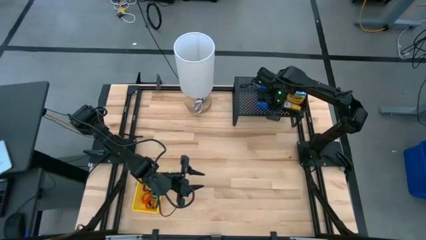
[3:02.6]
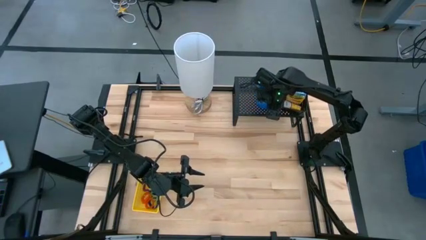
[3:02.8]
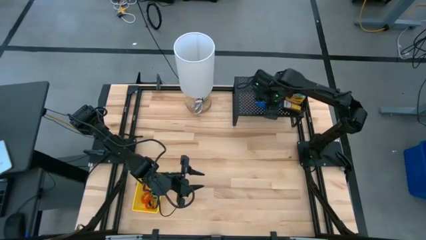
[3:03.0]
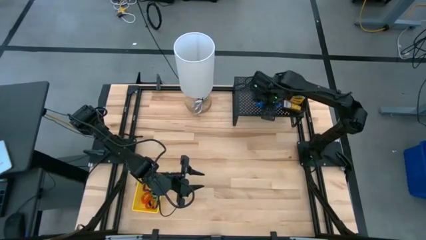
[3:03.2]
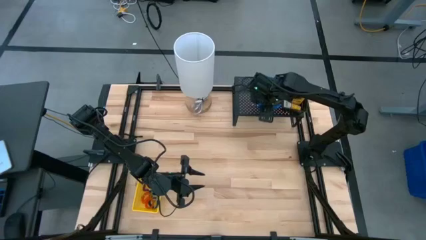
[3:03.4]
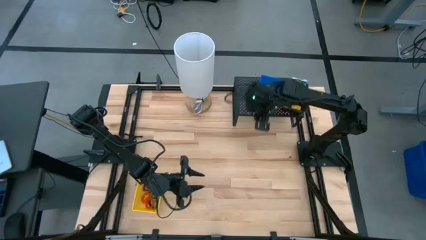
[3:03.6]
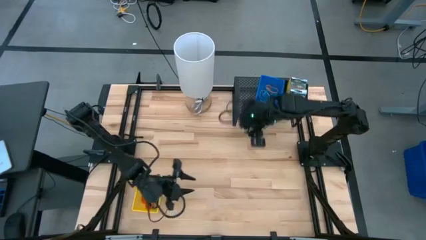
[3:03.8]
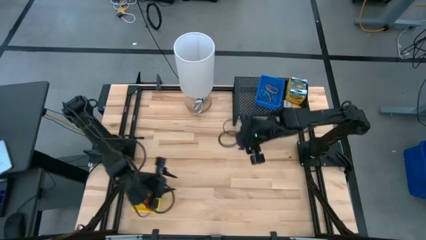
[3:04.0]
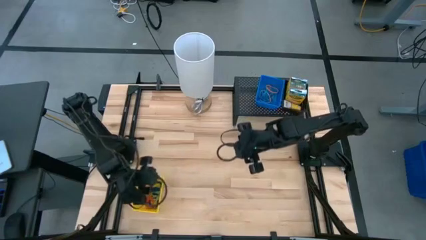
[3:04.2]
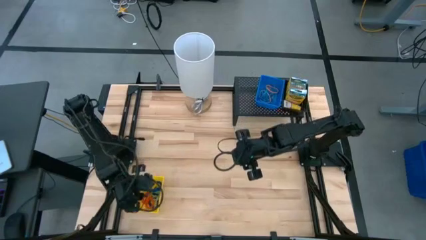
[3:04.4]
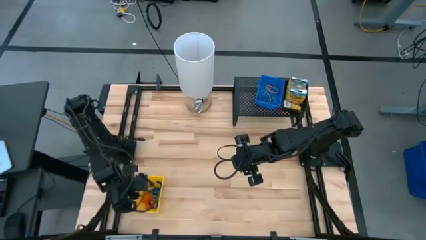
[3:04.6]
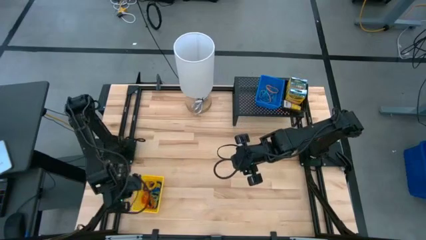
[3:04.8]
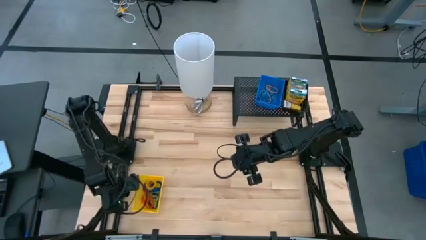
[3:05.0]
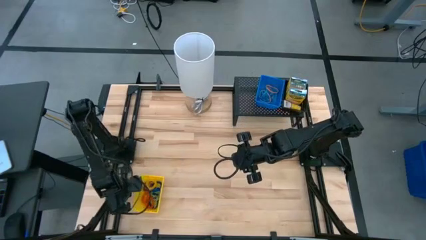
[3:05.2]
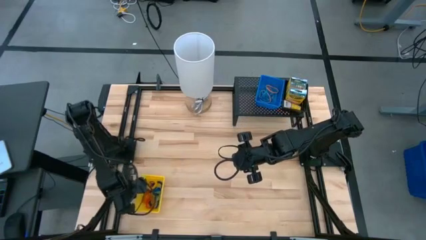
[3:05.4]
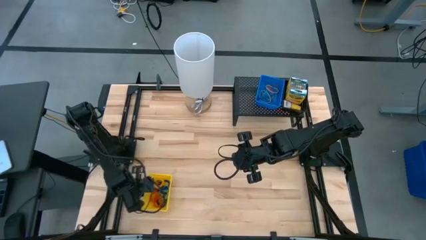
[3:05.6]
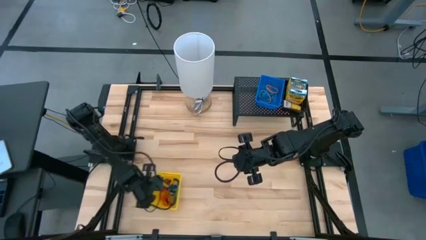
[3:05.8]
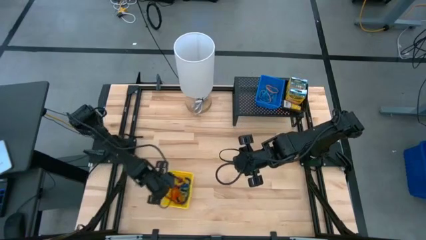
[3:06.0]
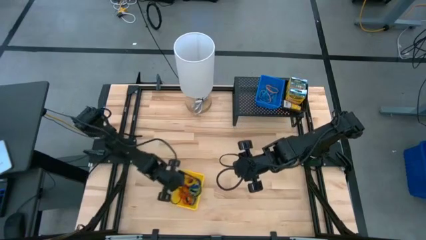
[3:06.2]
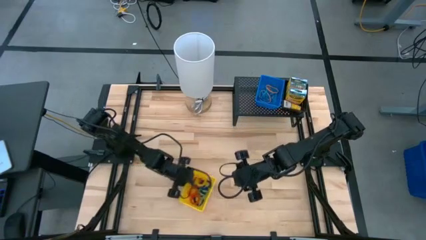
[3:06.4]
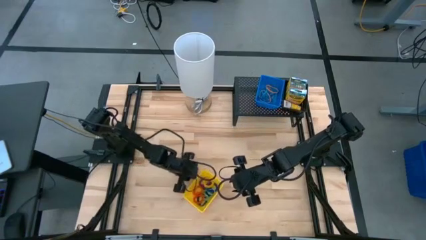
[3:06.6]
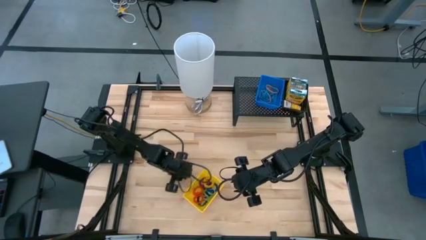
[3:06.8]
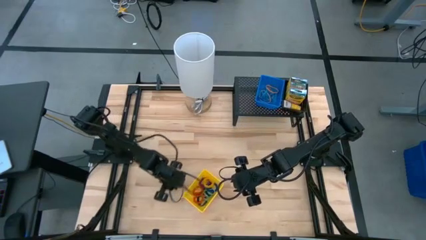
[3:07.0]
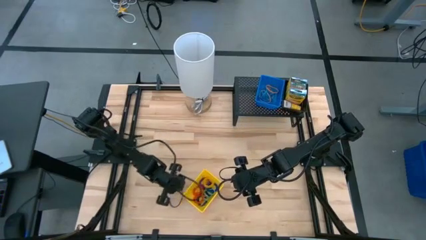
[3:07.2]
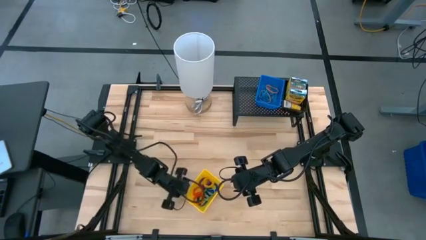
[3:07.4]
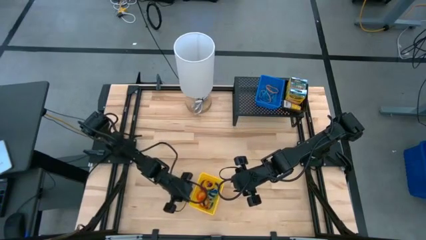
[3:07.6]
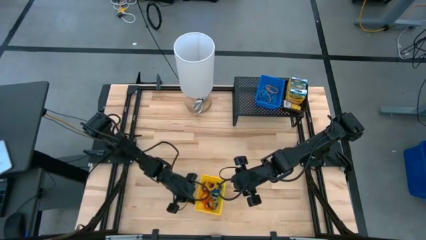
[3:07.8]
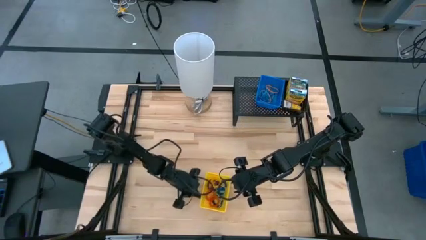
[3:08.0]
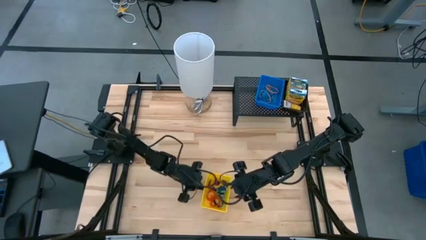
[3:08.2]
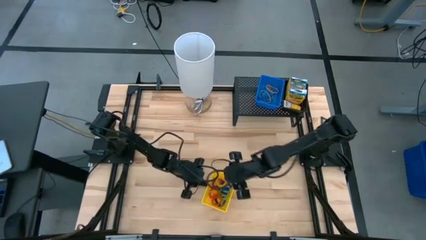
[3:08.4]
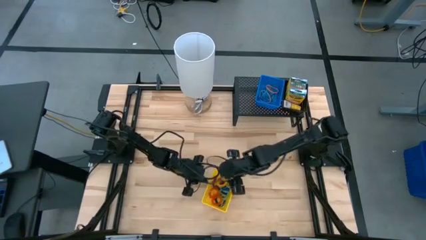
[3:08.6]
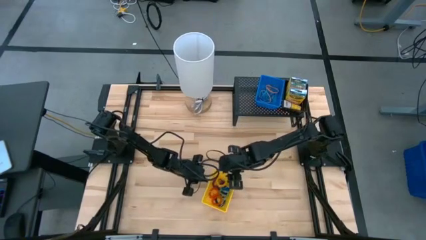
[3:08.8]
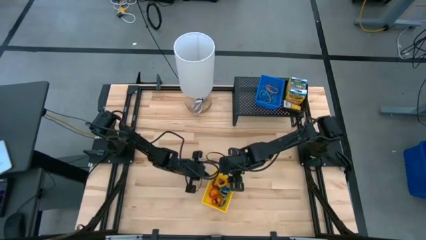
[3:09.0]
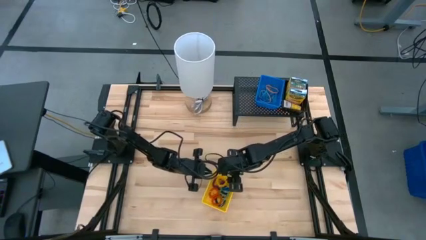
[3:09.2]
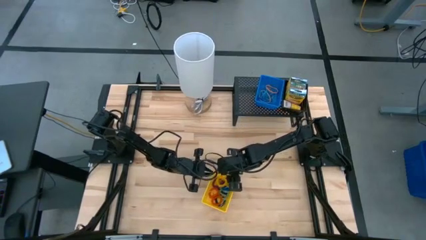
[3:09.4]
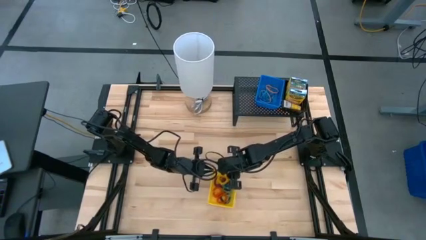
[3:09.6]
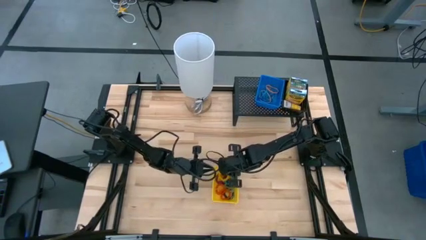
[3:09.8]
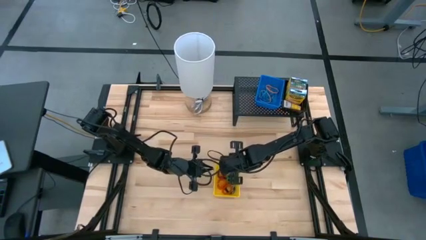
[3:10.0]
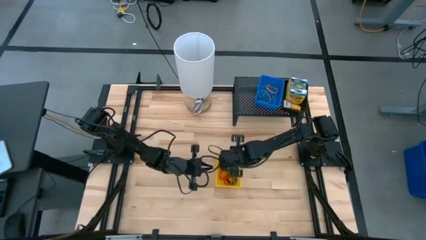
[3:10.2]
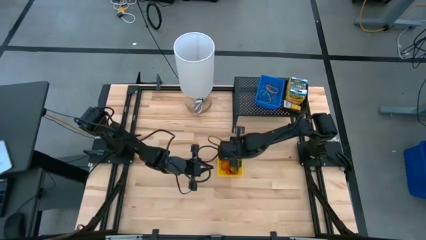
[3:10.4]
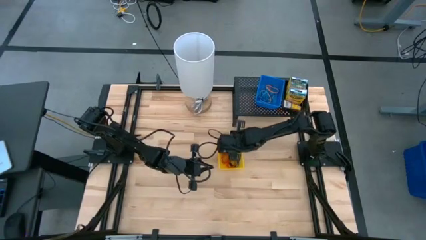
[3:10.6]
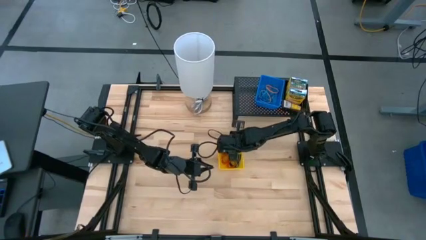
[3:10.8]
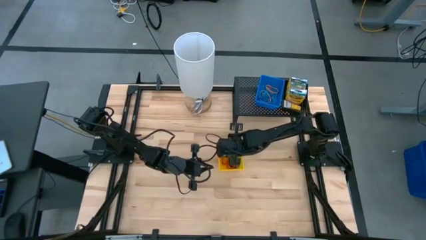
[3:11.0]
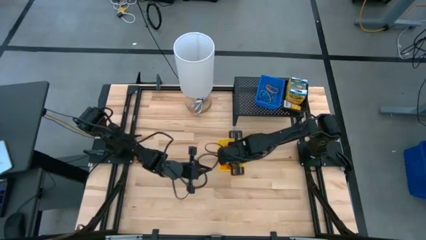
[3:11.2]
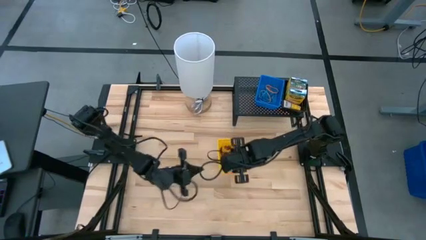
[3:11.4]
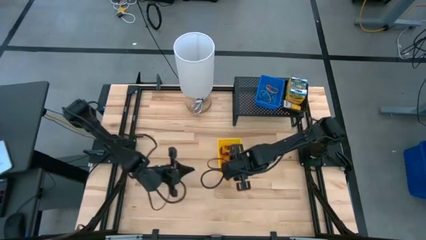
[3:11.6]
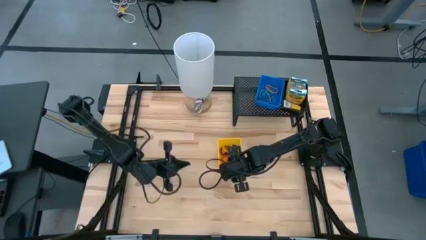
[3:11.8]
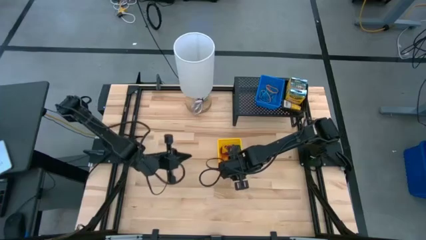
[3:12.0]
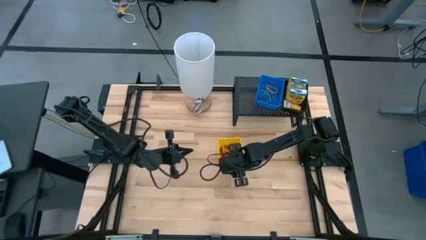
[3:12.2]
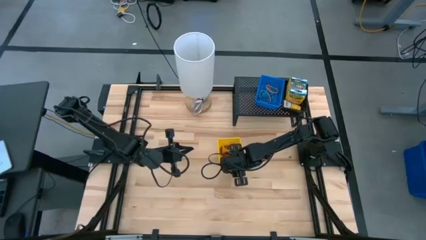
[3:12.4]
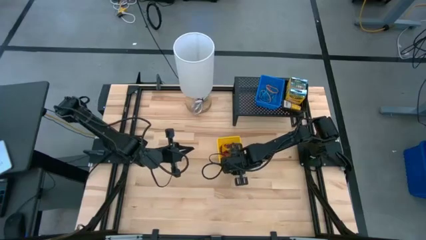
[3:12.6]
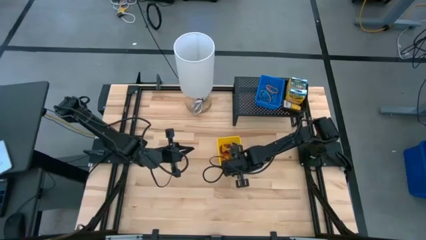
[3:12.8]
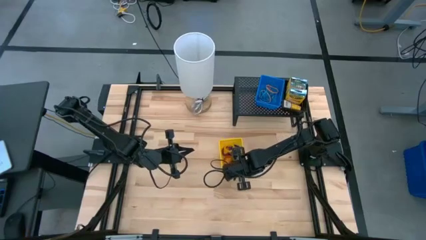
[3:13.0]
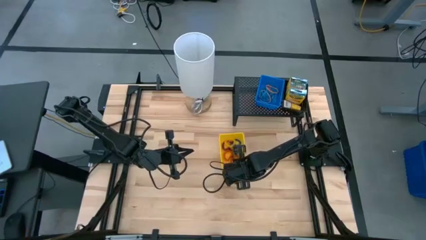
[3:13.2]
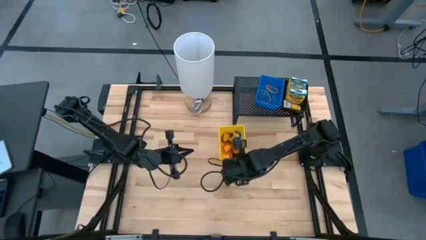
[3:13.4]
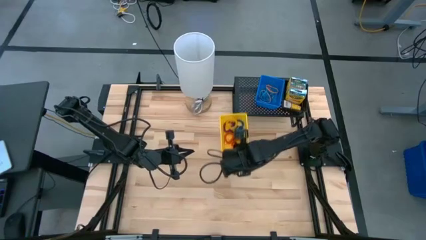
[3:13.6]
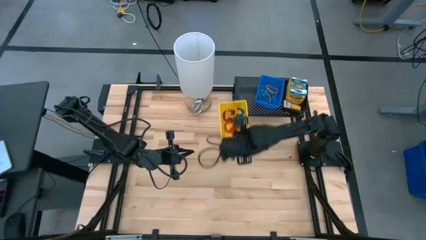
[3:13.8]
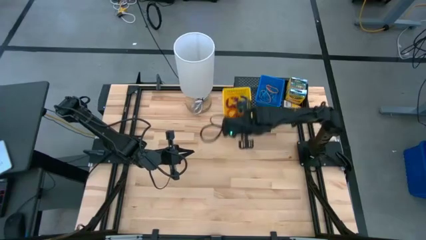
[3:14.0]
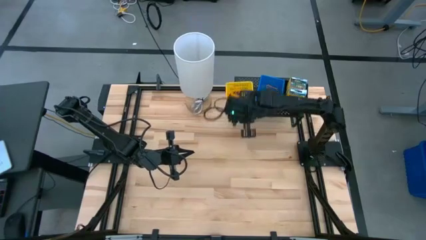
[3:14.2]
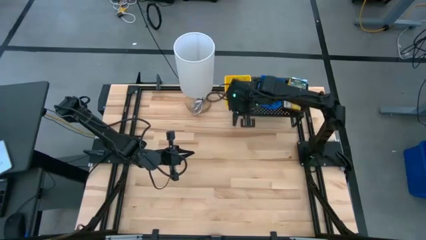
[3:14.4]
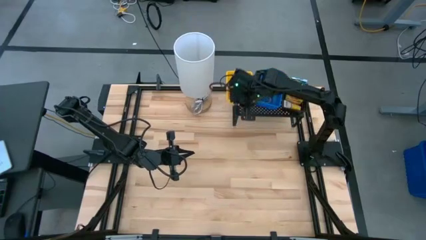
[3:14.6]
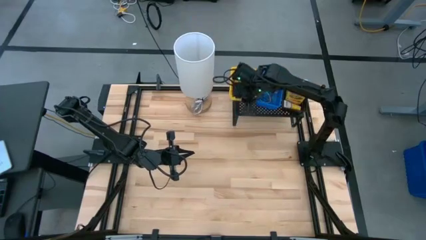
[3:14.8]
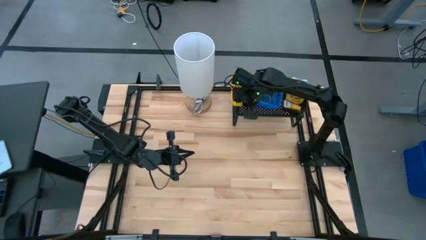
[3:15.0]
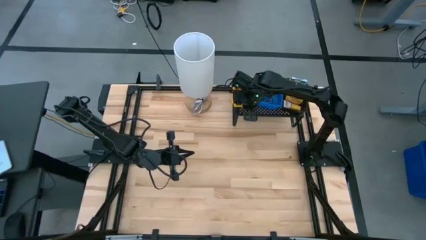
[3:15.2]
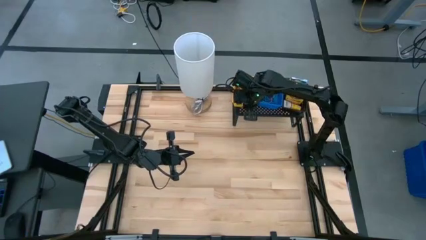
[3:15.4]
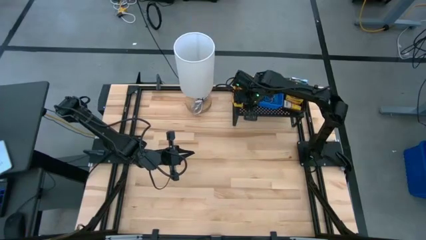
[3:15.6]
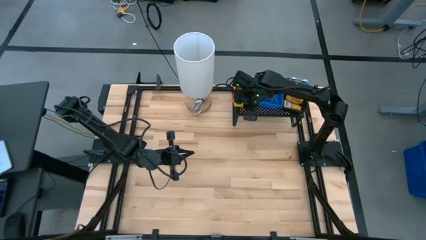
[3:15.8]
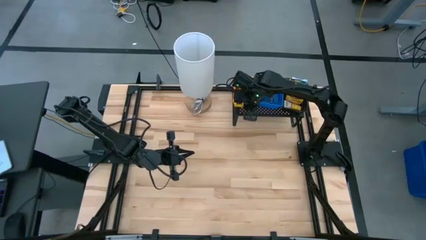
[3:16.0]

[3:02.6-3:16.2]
Task: Pick & Place Office Desk Supplies
Put the yellow bin on the shelf
